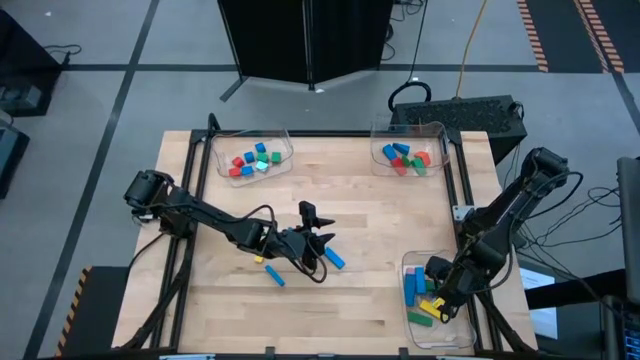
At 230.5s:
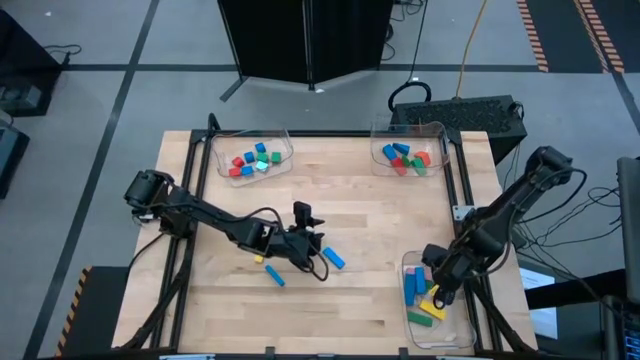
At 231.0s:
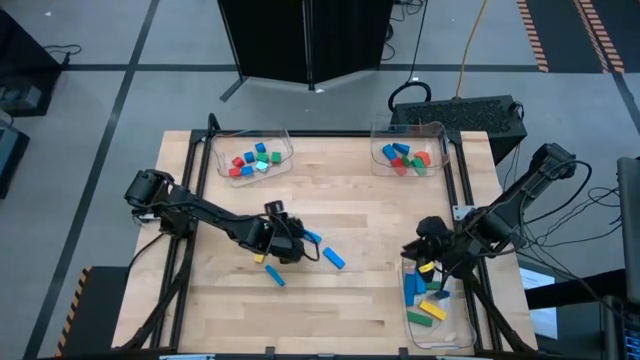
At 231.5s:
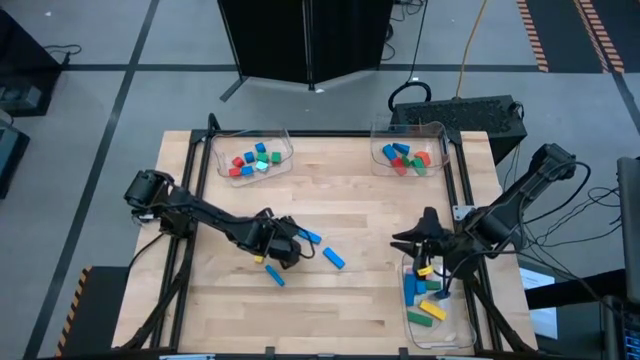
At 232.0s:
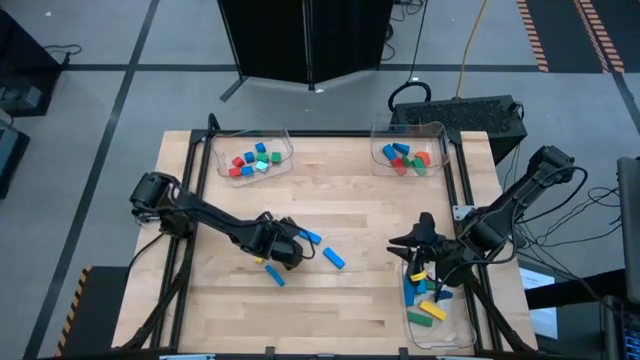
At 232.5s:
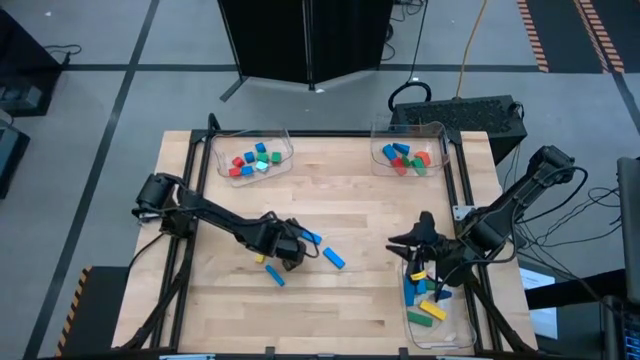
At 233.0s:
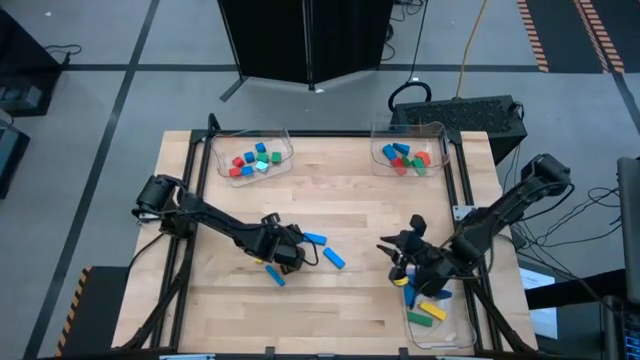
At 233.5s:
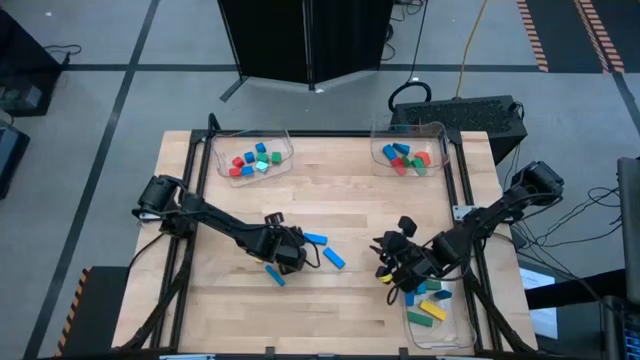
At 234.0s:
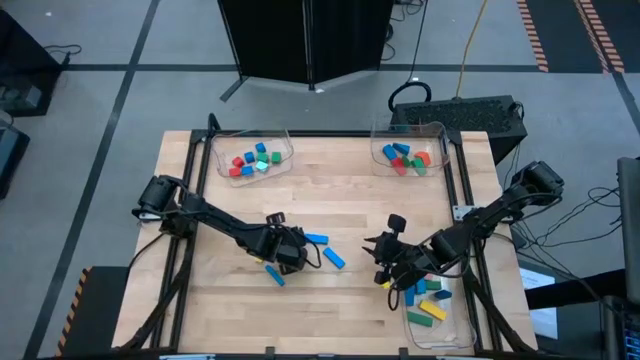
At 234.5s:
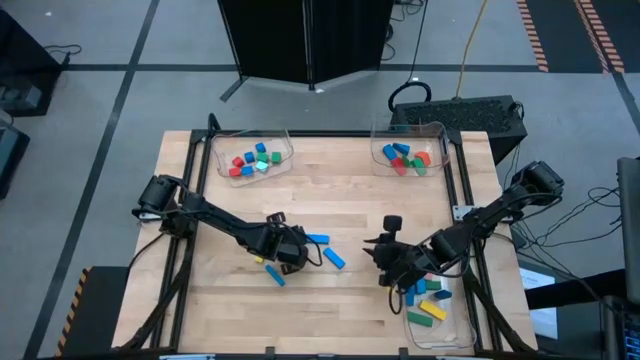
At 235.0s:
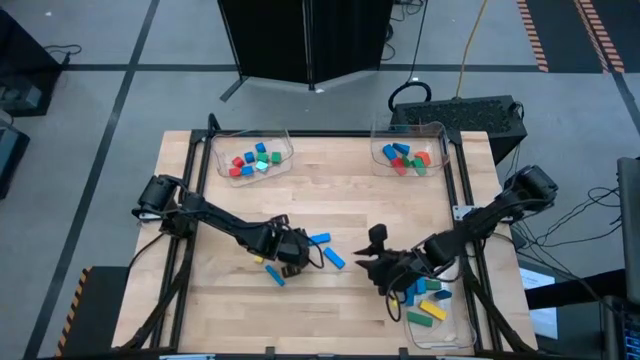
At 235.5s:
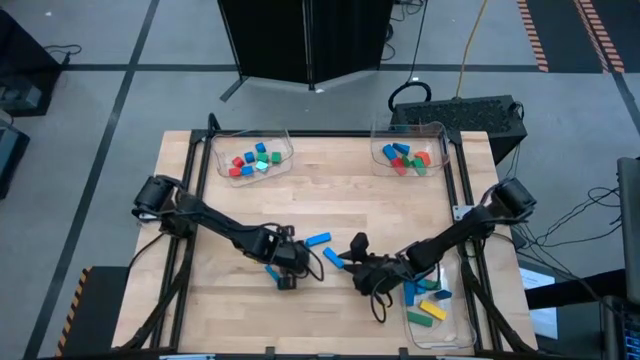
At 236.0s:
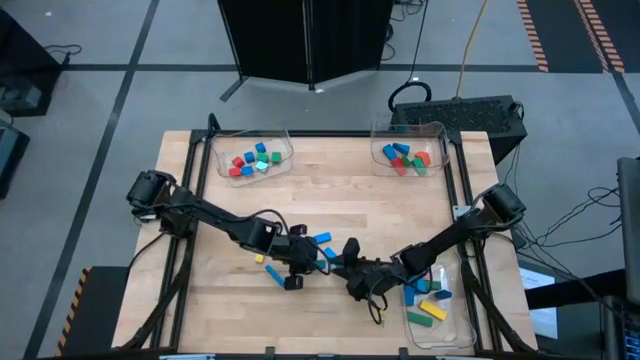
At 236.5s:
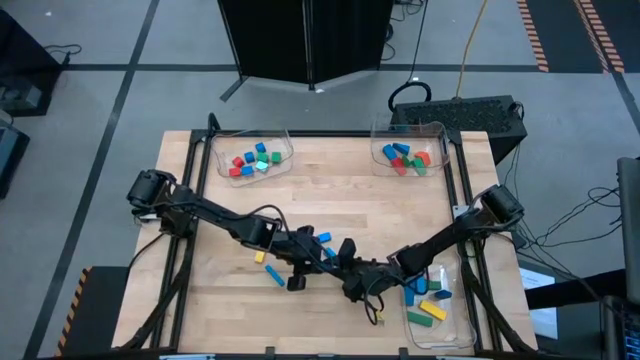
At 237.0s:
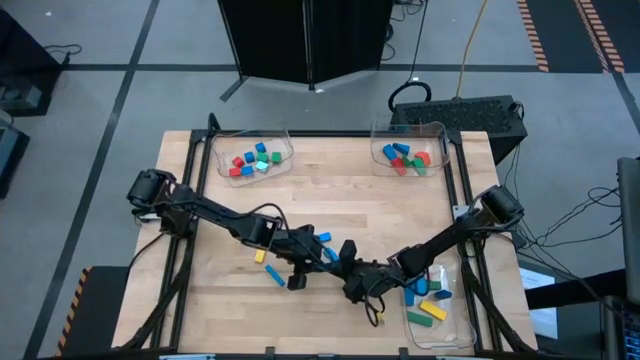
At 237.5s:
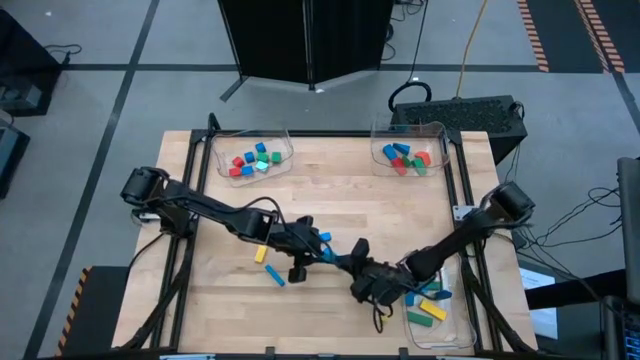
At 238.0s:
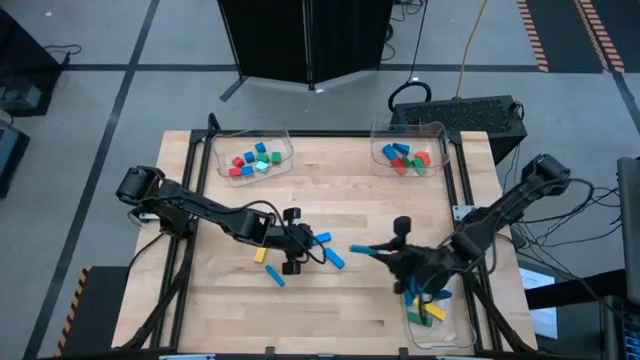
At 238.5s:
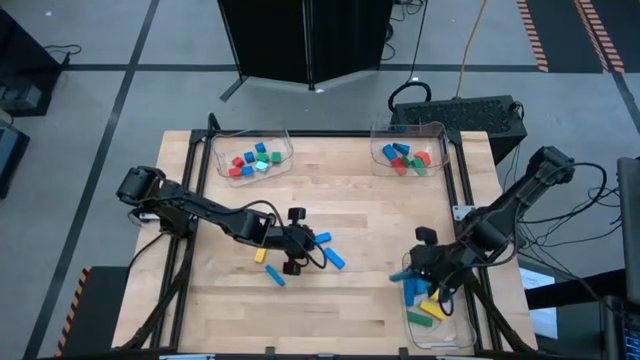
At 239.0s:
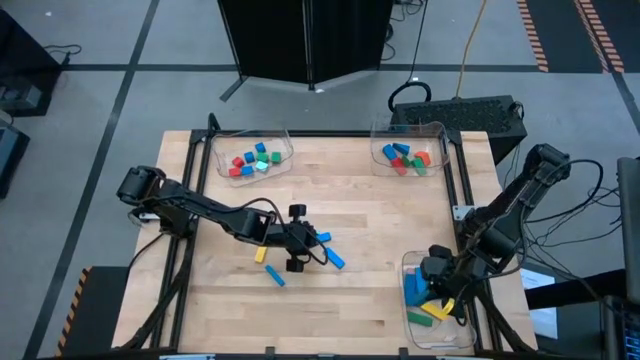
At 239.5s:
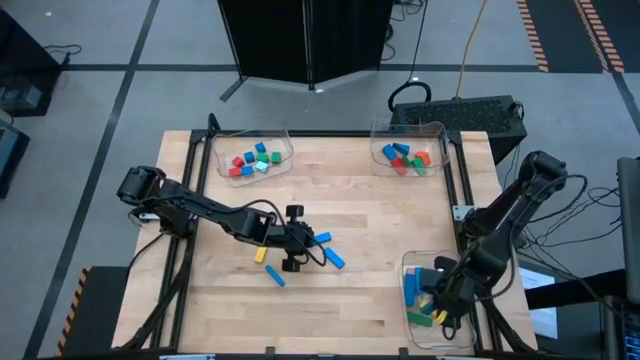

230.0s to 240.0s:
Task: Sort blocks by size
Put the blue rectangular block into the bottom right transparent bin

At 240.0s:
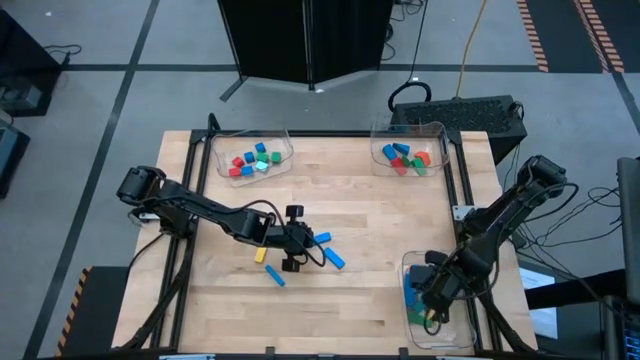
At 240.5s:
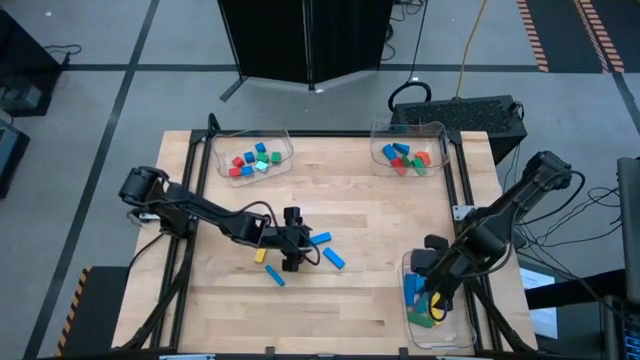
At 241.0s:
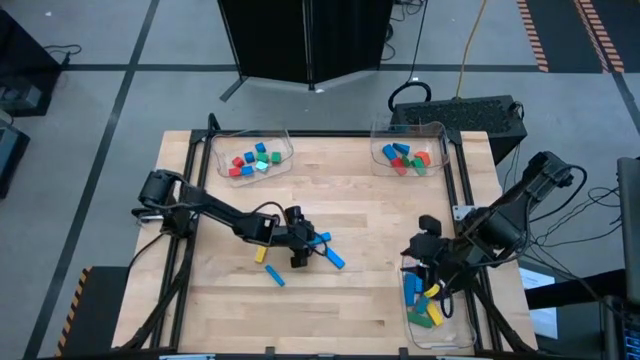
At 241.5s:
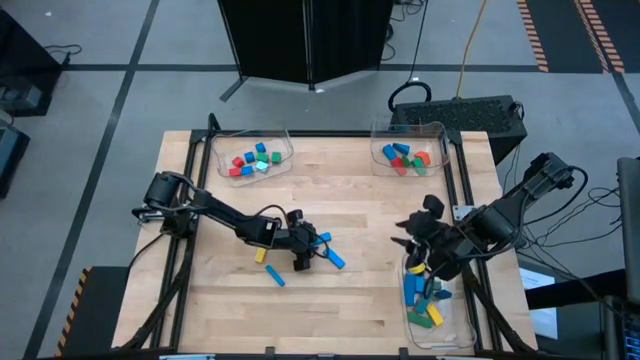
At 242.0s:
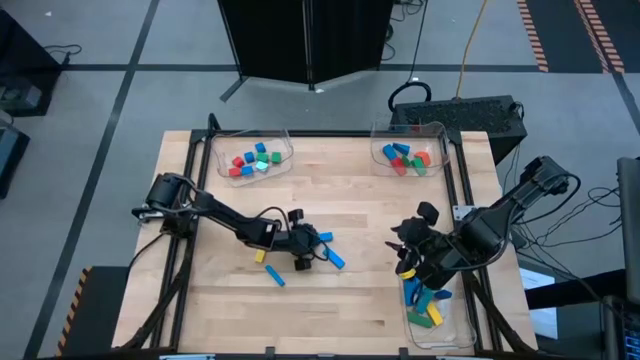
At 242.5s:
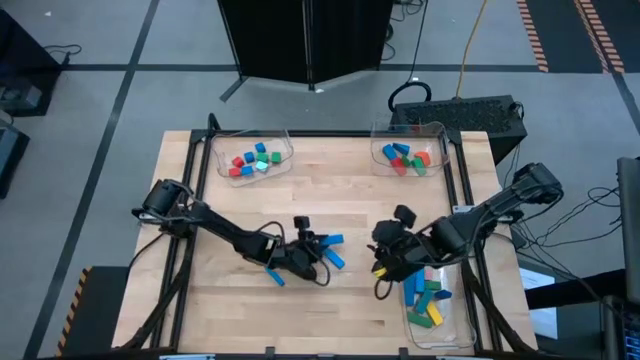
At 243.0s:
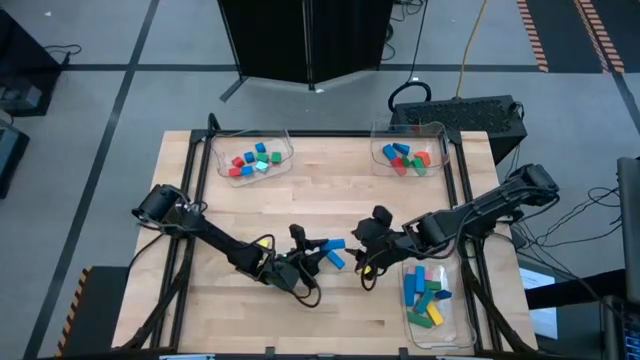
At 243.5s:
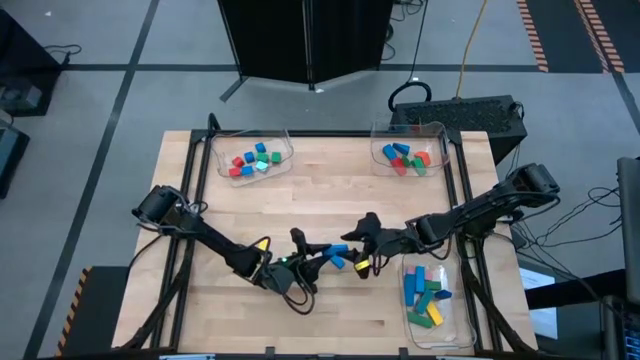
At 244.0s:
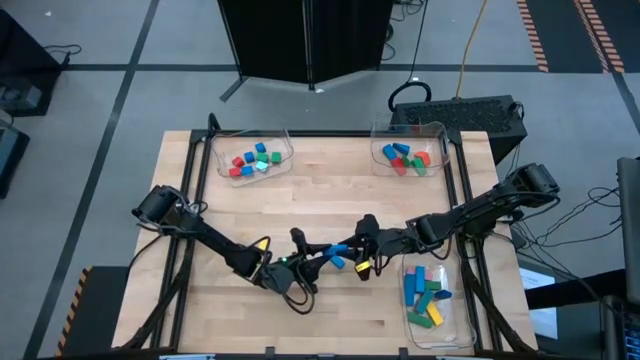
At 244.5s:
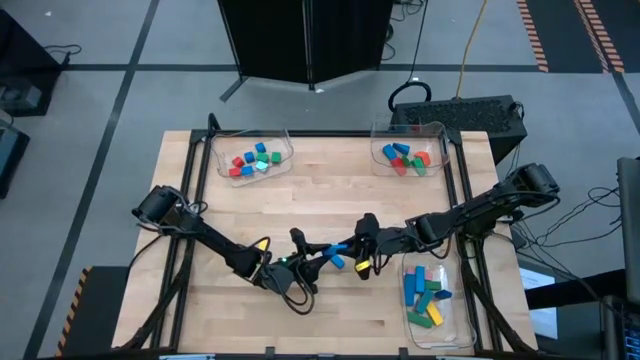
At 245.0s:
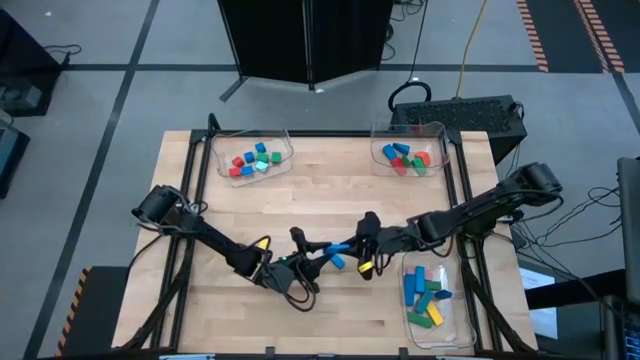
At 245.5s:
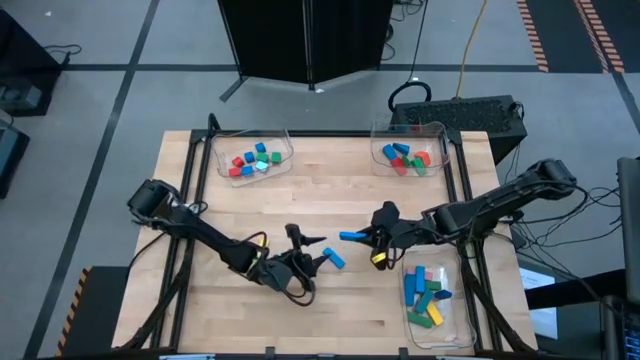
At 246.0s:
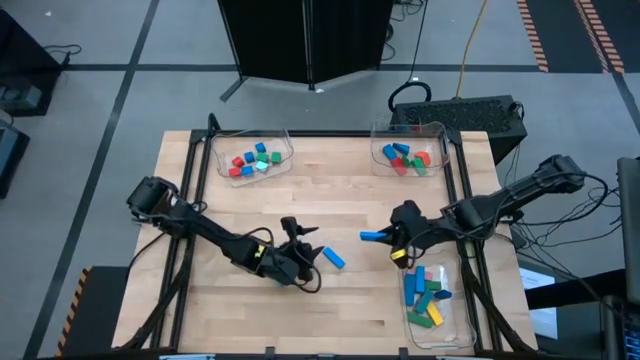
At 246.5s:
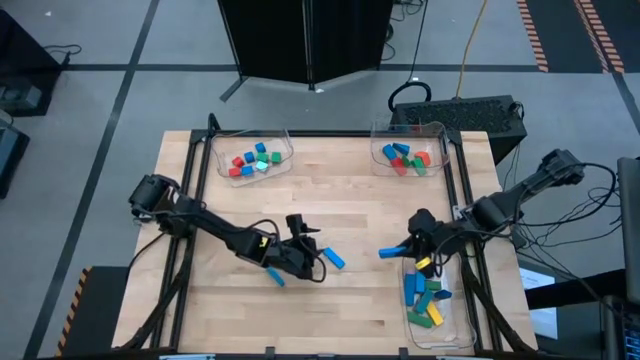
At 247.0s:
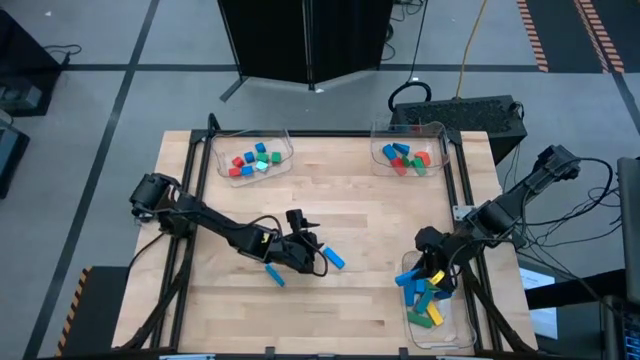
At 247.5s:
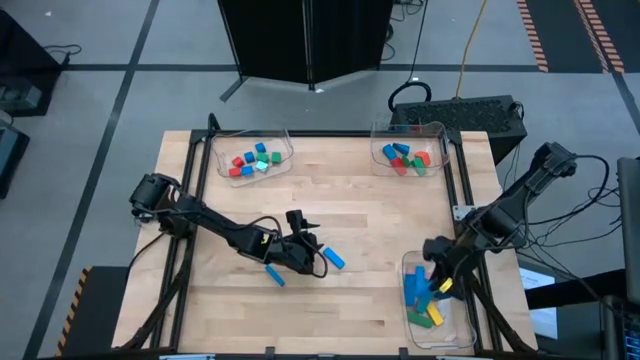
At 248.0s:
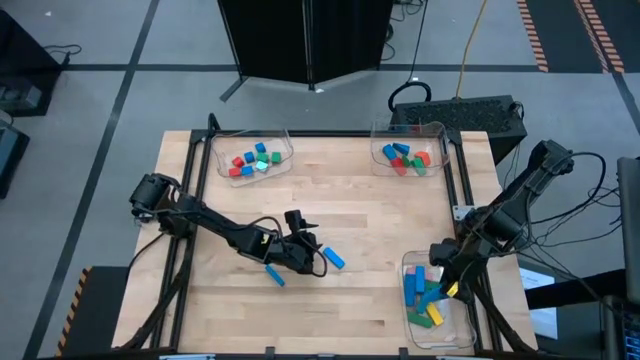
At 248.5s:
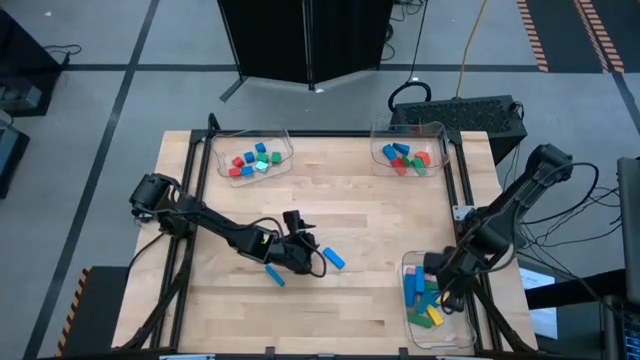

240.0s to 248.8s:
Put the blue rectangular block into the bottom right transparent bin

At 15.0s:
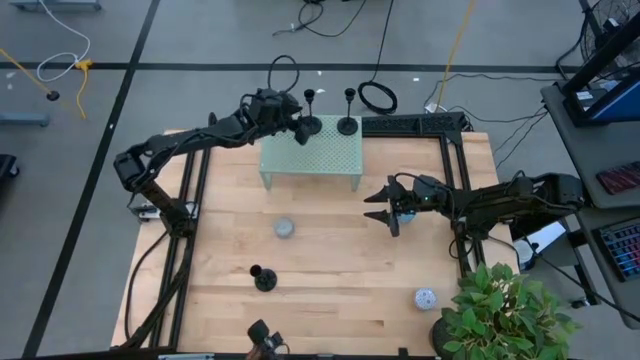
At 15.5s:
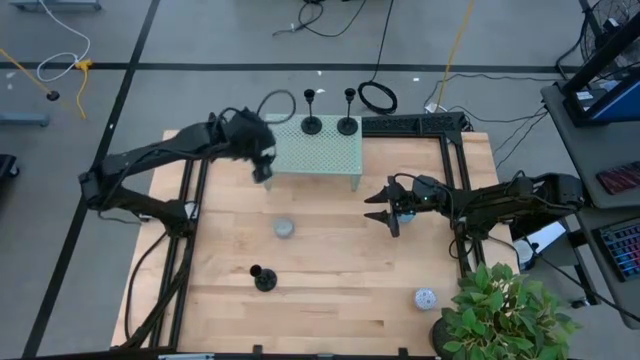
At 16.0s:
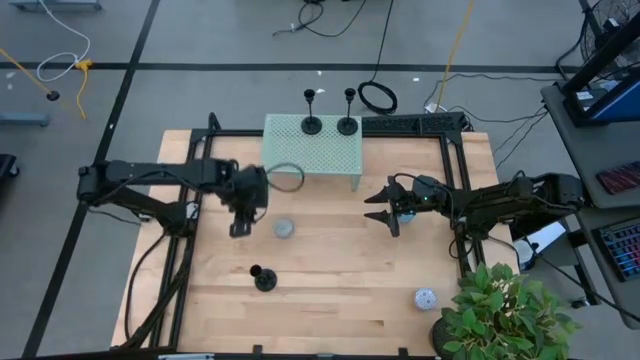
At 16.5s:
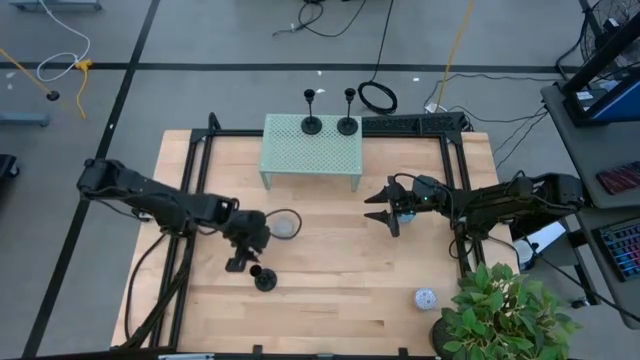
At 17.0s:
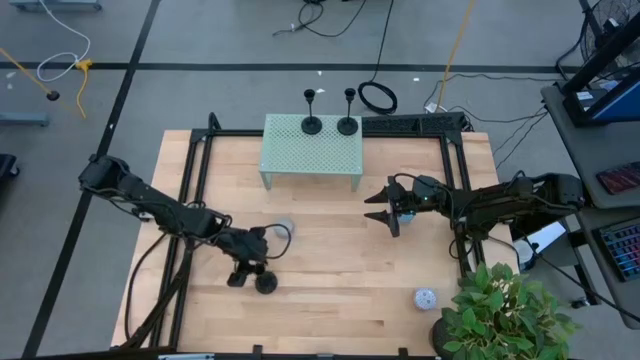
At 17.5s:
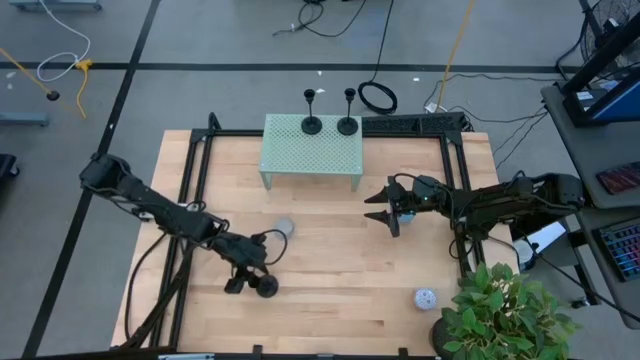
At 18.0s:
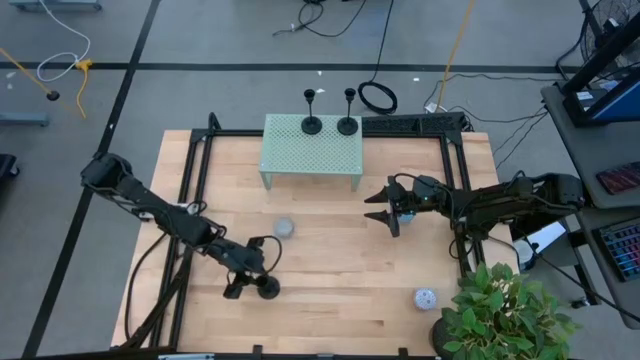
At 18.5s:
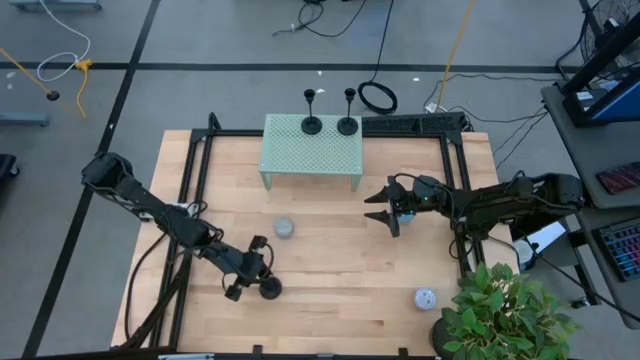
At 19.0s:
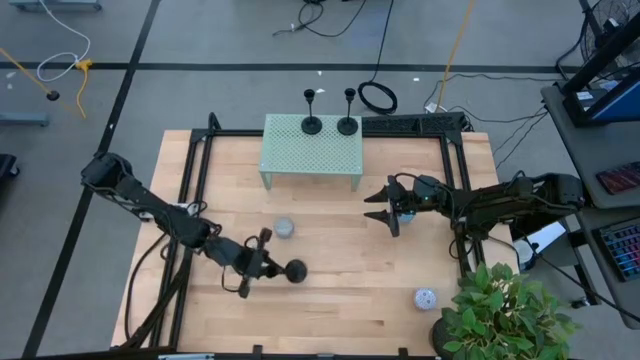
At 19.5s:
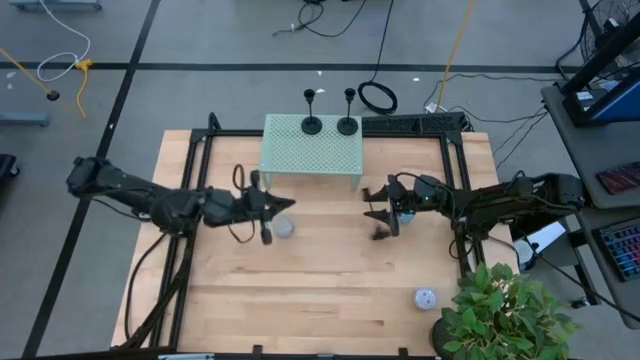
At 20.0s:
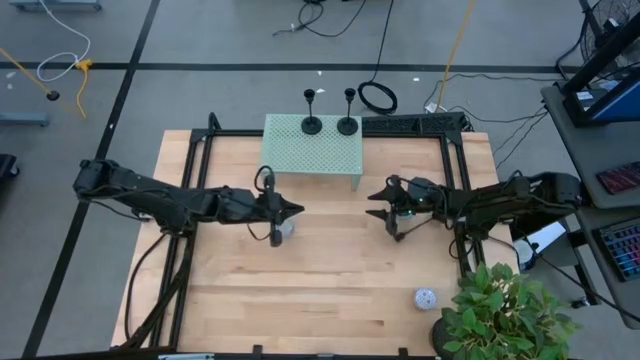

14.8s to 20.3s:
Task: Pick & Place candle stick holders
Put the black candle holder on the shelf
